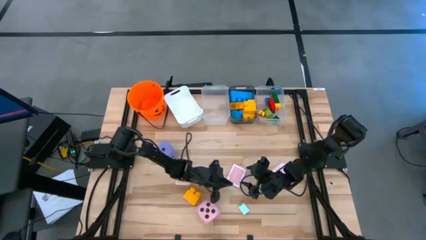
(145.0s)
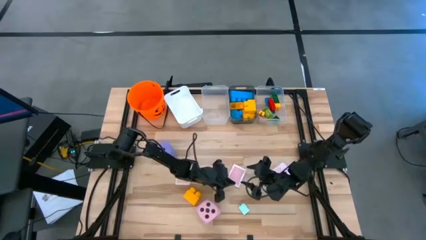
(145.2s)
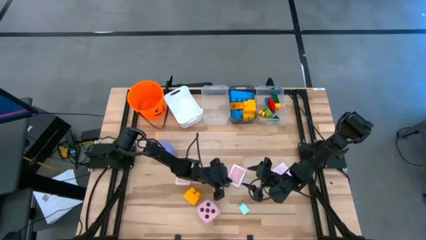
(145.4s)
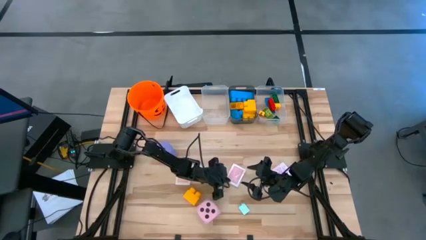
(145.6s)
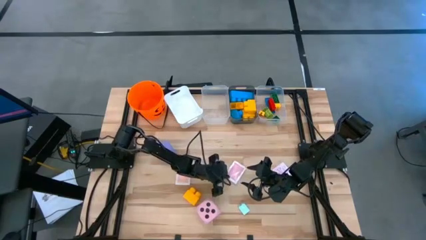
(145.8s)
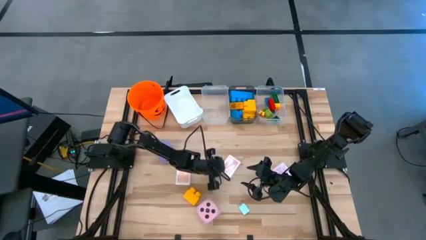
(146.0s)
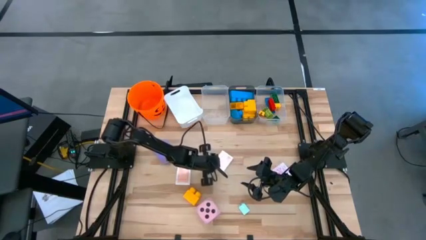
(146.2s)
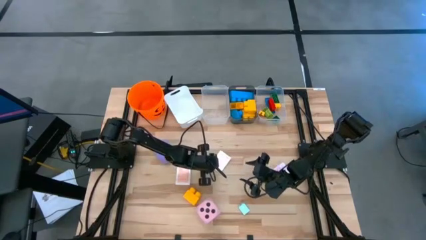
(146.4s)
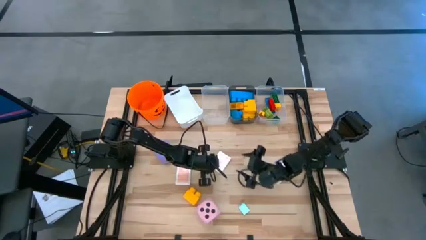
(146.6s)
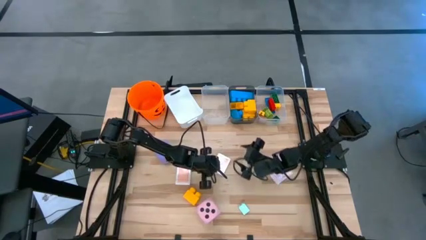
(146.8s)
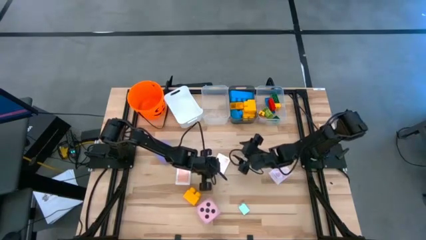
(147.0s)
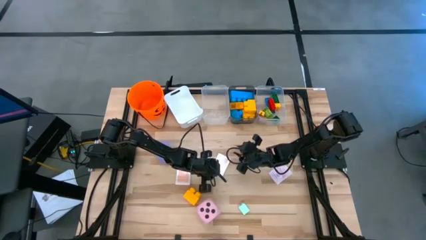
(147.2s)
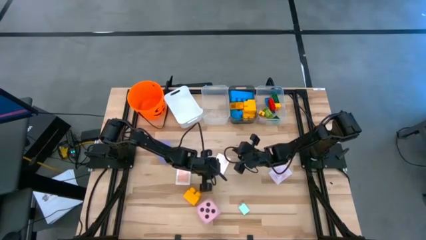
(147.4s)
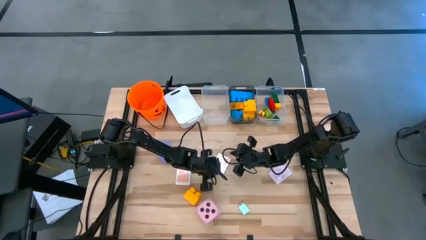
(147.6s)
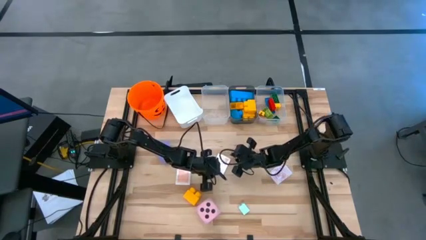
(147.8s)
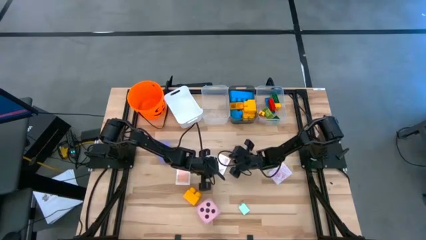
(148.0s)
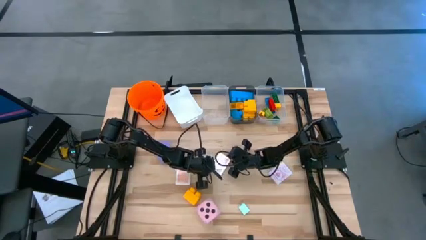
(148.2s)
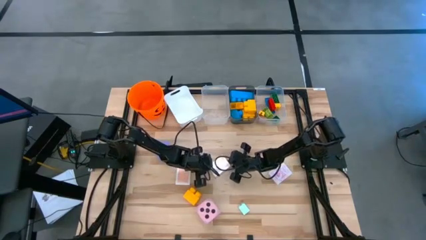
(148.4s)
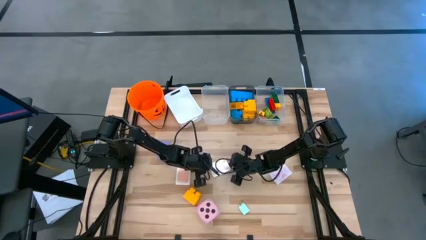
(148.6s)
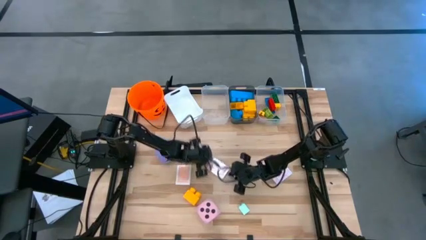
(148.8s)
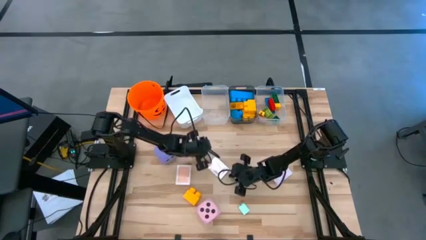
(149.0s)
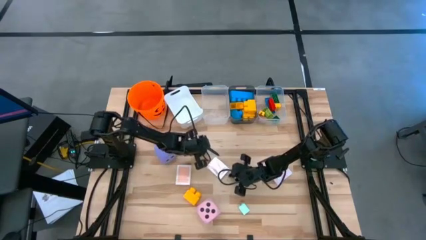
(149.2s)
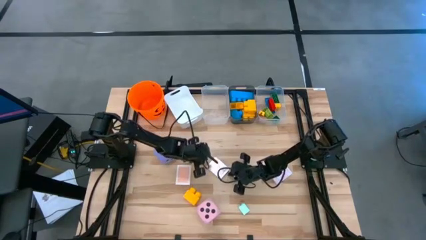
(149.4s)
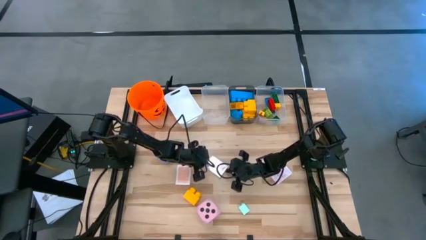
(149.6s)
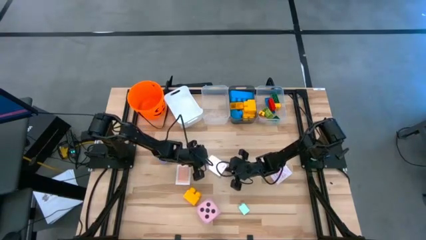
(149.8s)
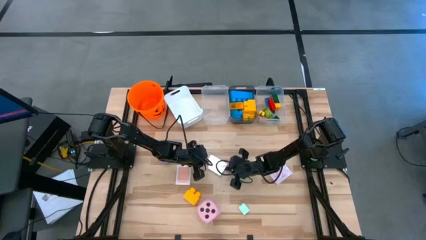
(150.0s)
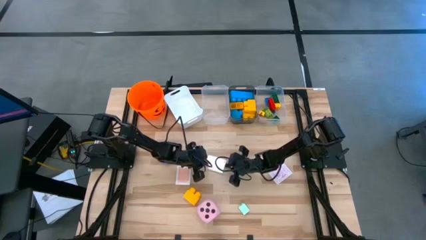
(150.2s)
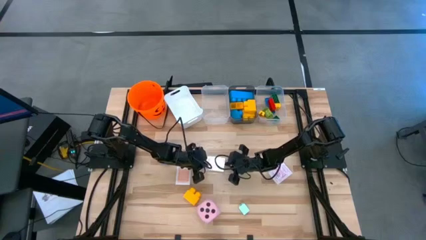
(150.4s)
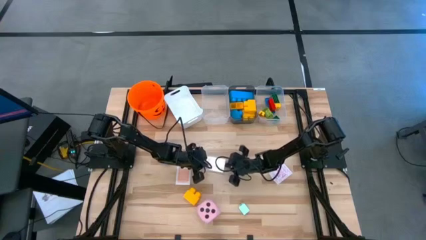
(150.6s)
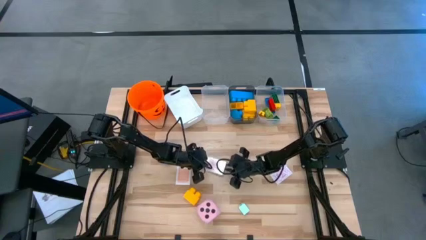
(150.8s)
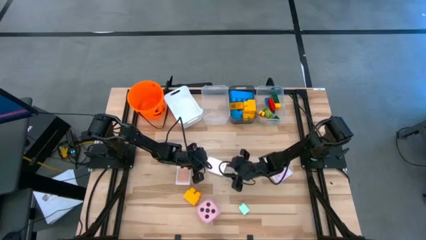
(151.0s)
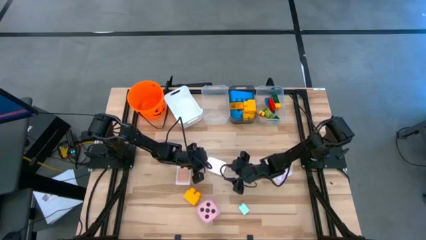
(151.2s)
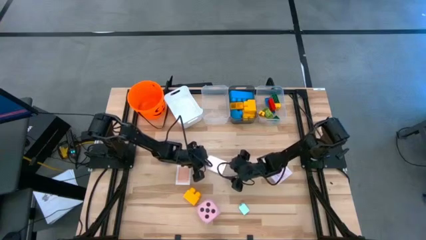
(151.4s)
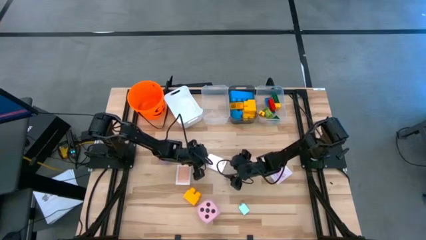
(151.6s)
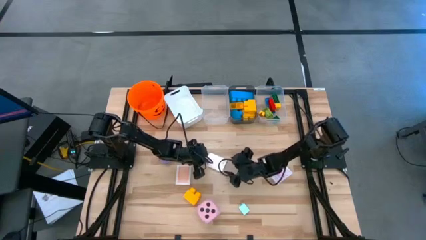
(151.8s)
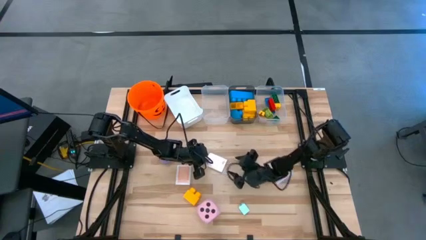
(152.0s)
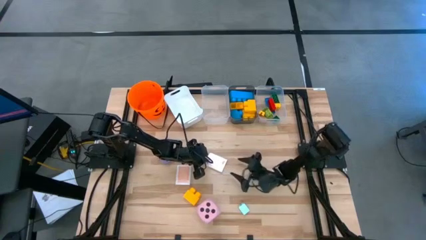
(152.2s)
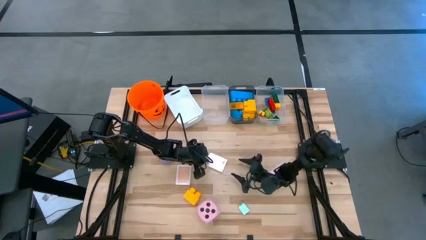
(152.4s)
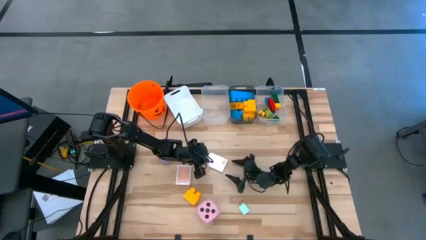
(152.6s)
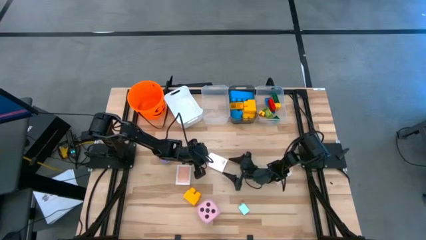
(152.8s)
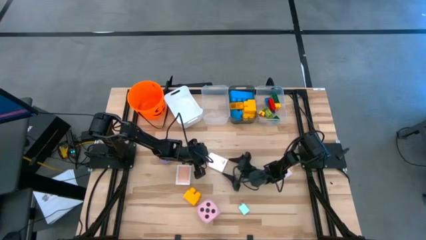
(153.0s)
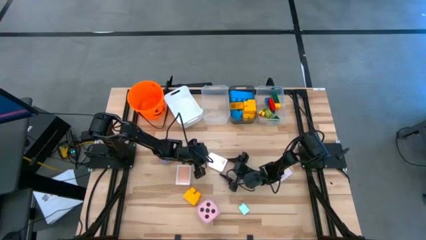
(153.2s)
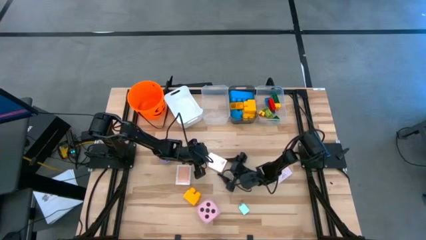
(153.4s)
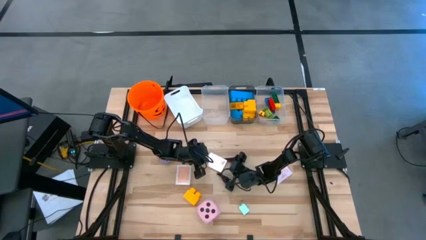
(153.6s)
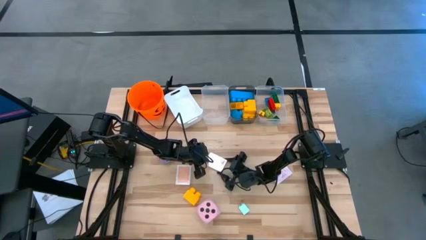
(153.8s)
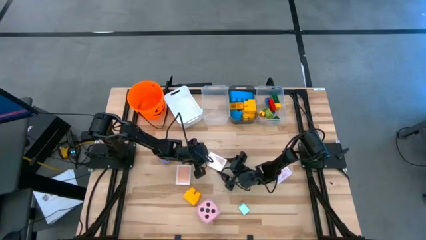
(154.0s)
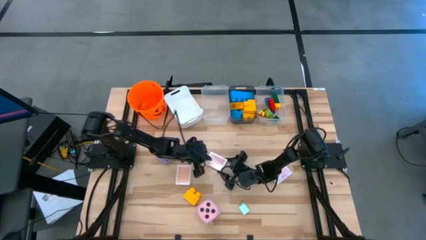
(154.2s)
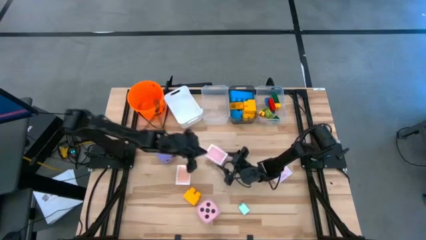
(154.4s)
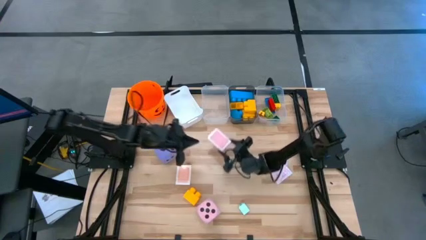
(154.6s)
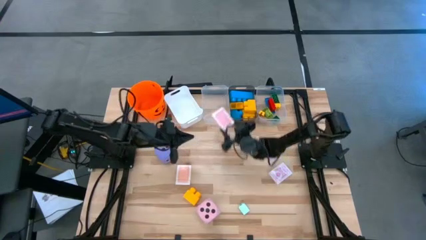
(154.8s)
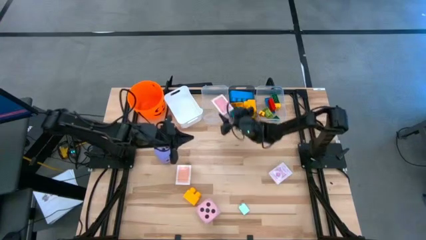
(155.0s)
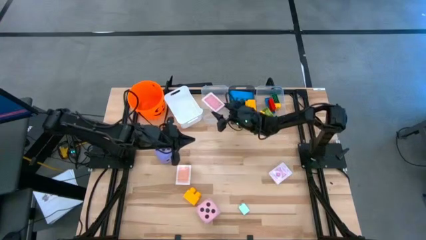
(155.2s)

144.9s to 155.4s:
Task: Pick & Place Toys
Put the red deck of cards into the left transparent bin

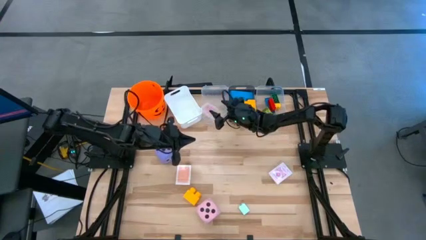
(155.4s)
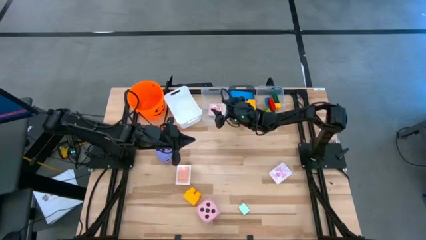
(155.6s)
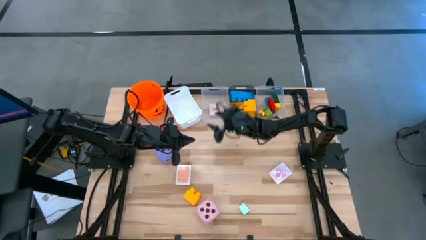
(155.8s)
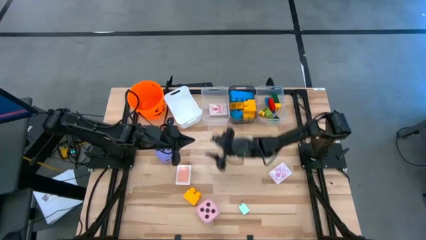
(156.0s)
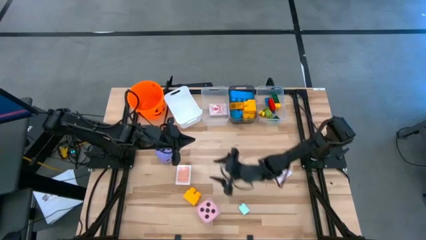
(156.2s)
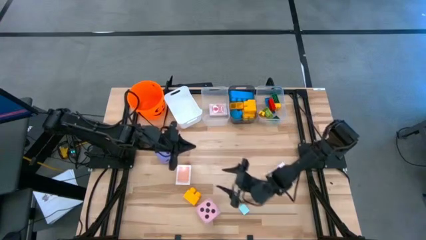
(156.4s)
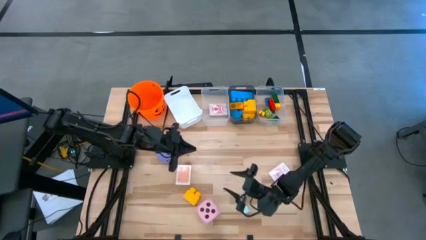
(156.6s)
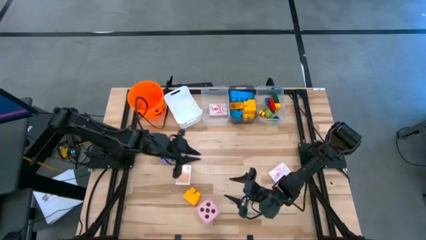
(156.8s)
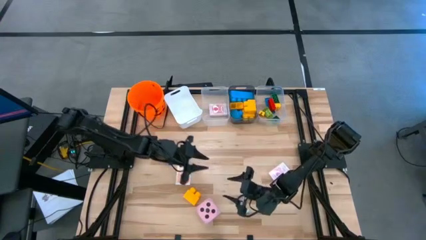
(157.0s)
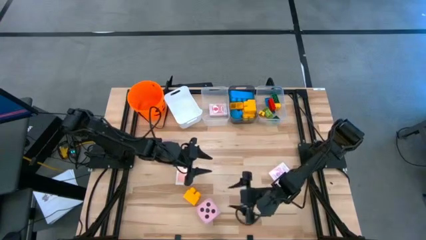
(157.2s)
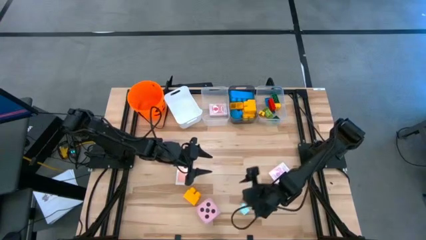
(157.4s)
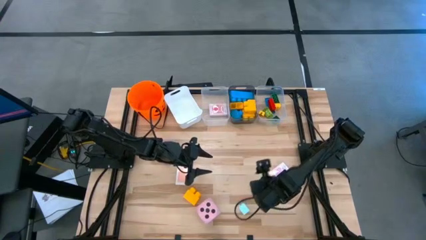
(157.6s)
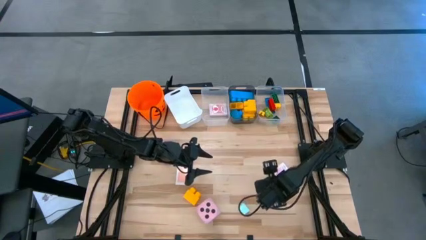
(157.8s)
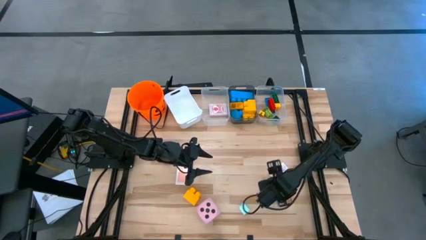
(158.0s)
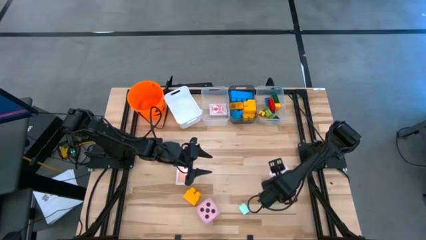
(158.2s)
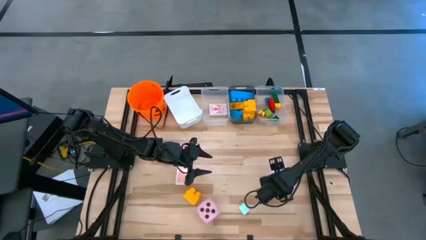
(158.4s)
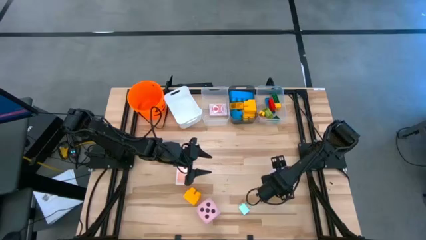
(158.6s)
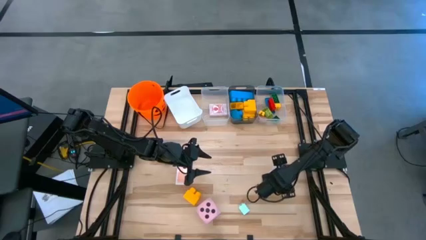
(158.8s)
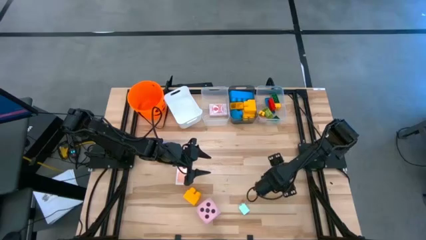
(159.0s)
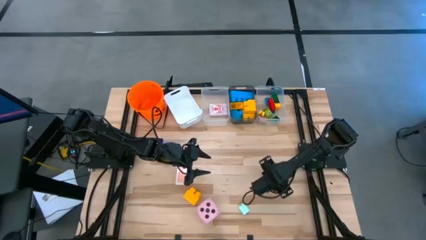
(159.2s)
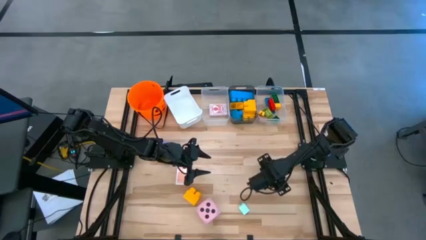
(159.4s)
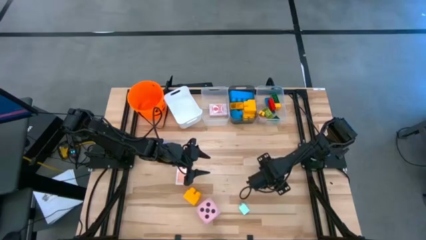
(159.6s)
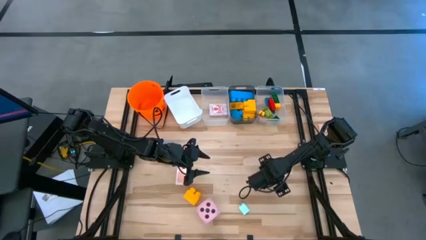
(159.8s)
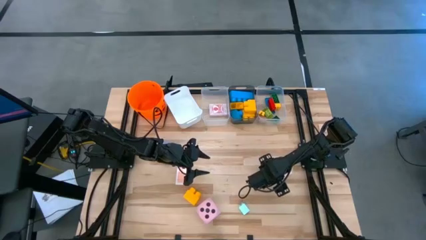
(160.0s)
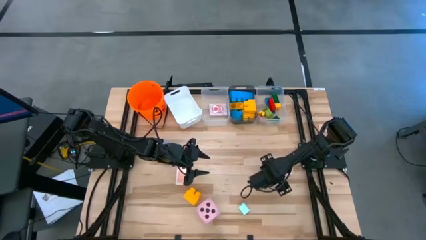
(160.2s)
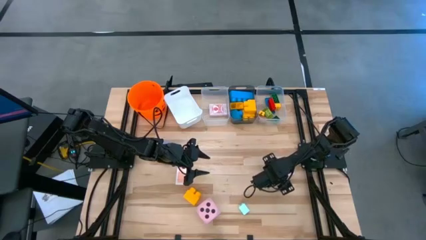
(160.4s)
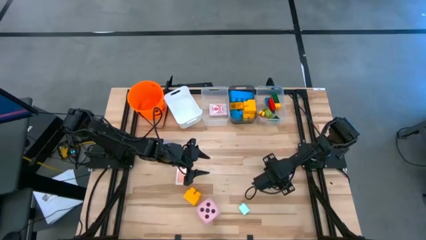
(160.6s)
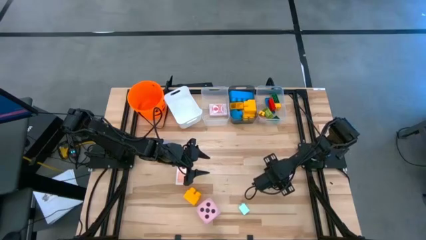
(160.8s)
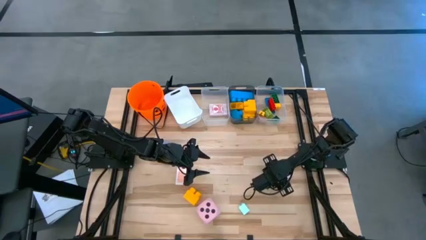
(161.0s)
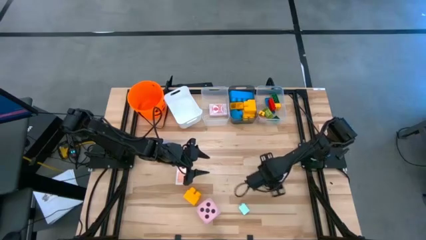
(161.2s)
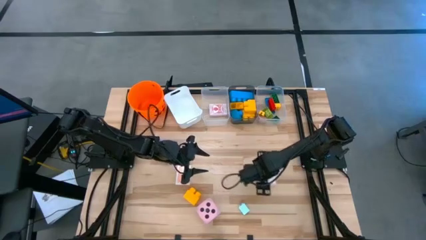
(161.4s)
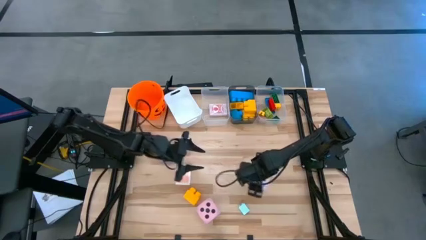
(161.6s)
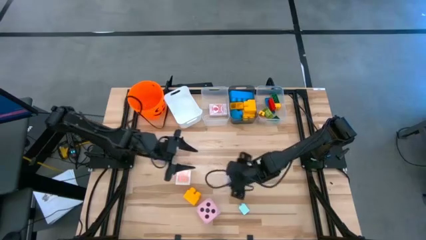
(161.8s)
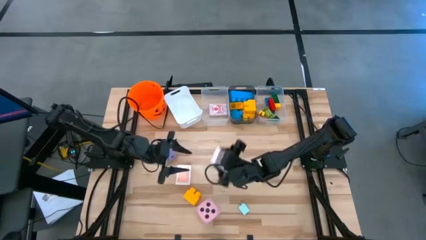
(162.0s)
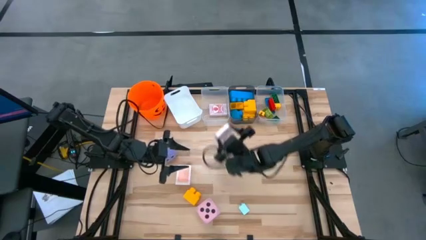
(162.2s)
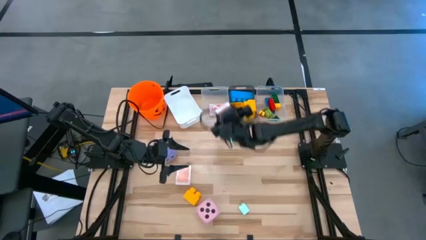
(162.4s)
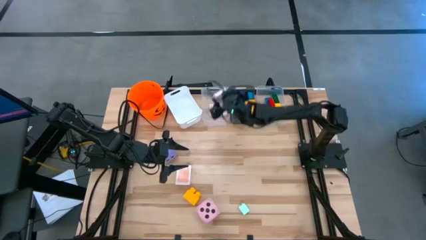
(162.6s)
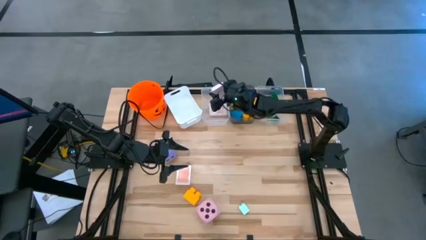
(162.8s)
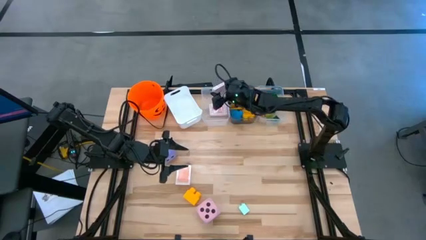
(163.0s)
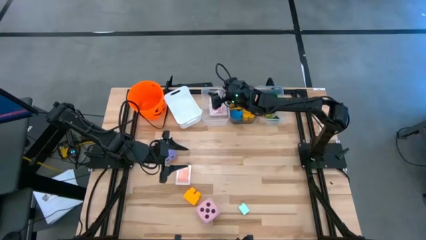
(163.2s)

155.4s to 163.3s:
Put the red deck of cards into the left transparent bin
